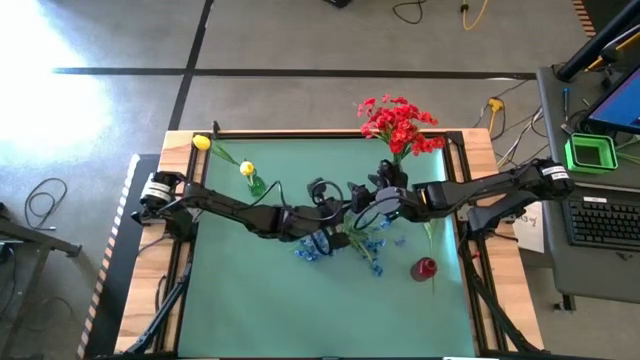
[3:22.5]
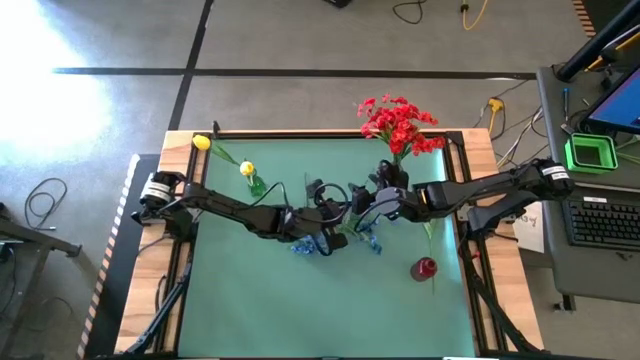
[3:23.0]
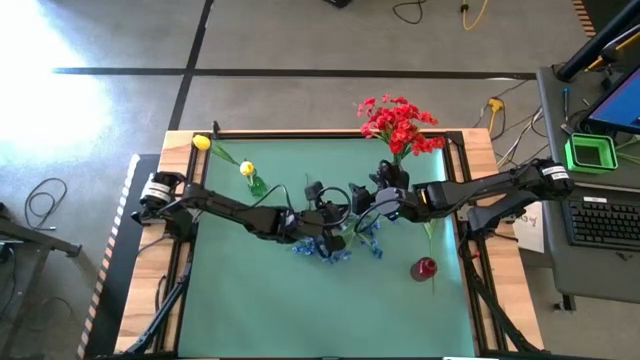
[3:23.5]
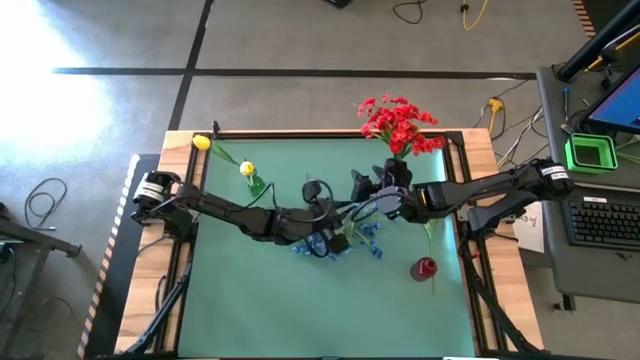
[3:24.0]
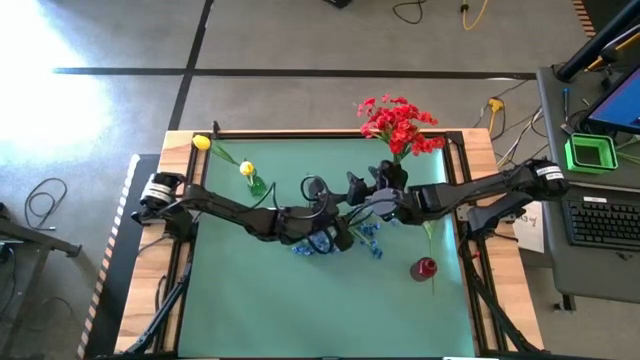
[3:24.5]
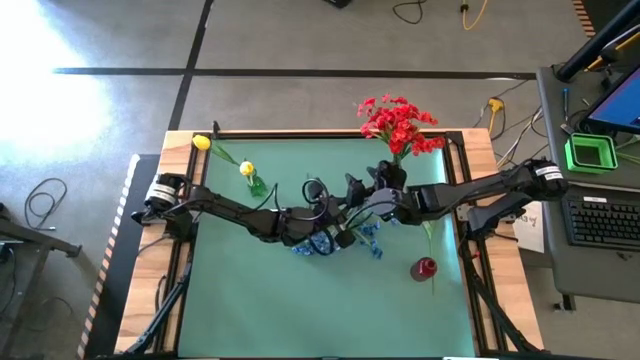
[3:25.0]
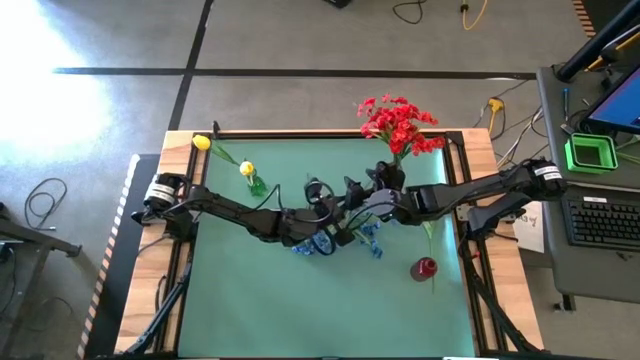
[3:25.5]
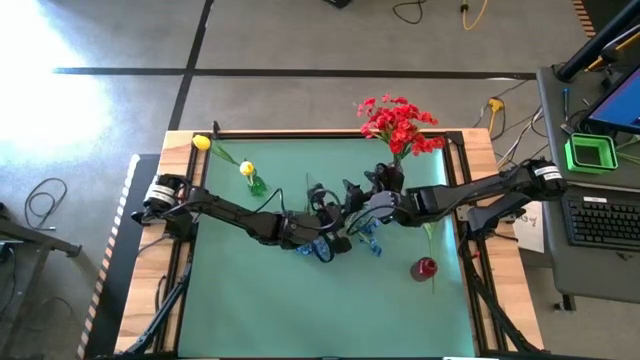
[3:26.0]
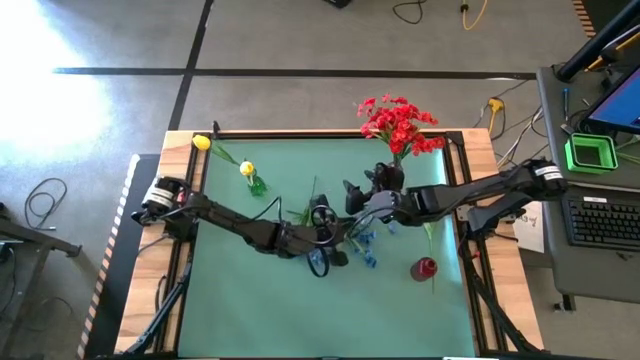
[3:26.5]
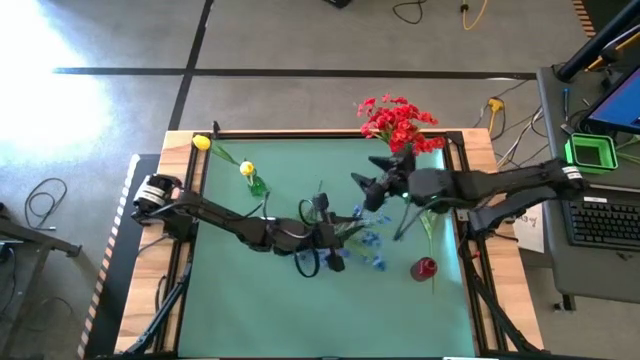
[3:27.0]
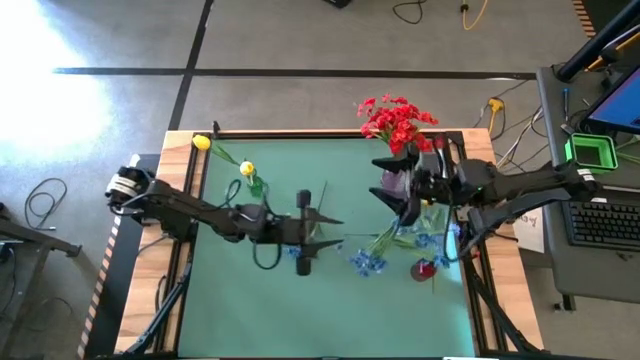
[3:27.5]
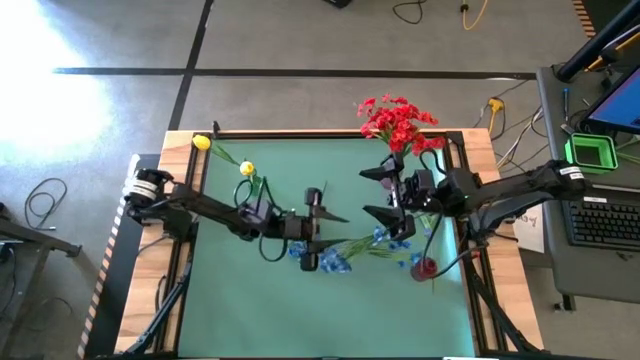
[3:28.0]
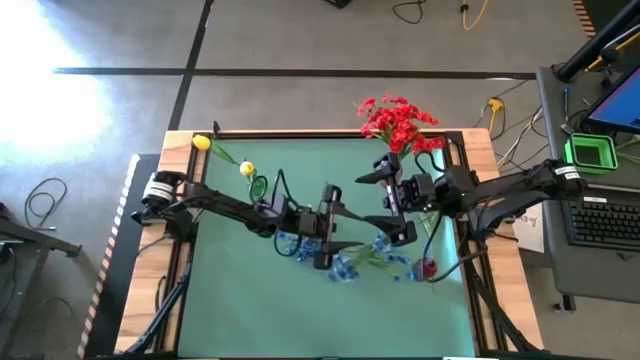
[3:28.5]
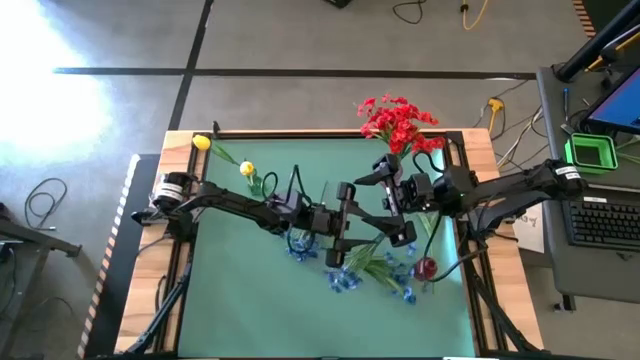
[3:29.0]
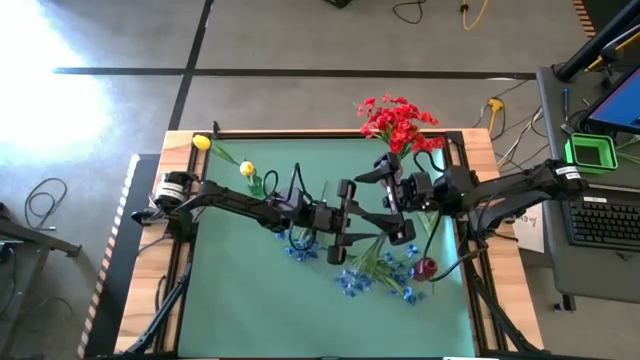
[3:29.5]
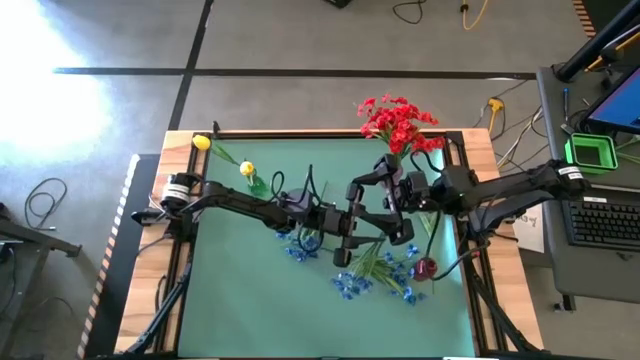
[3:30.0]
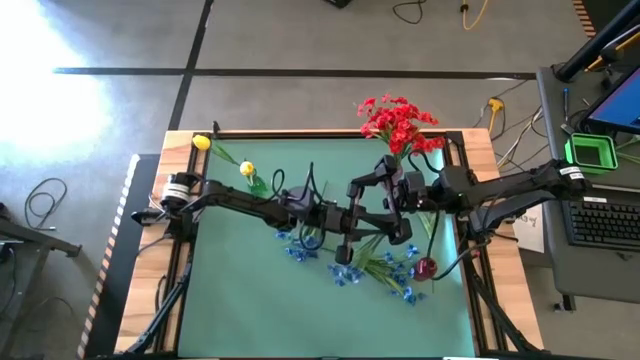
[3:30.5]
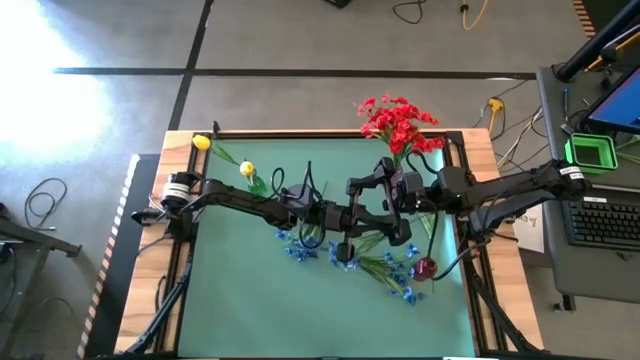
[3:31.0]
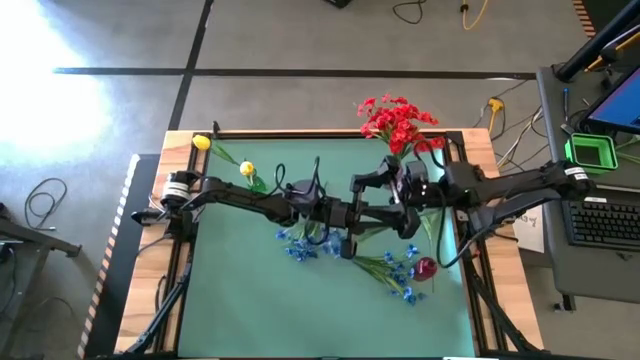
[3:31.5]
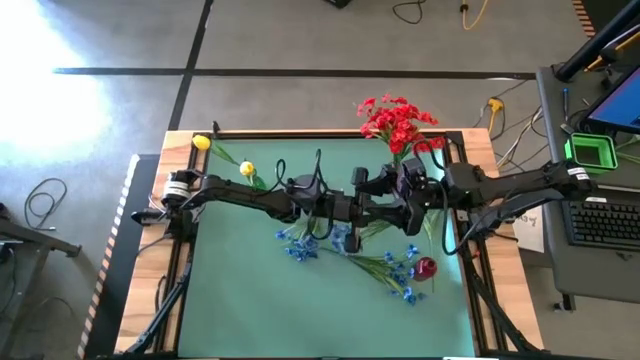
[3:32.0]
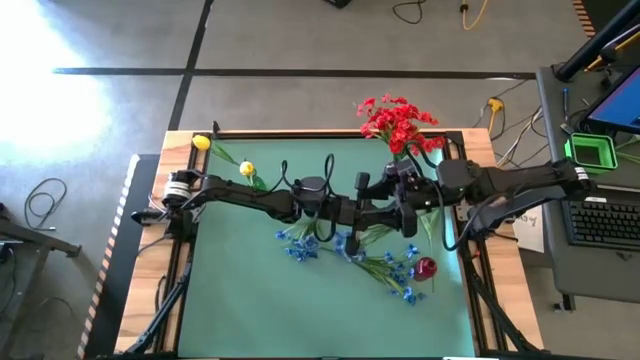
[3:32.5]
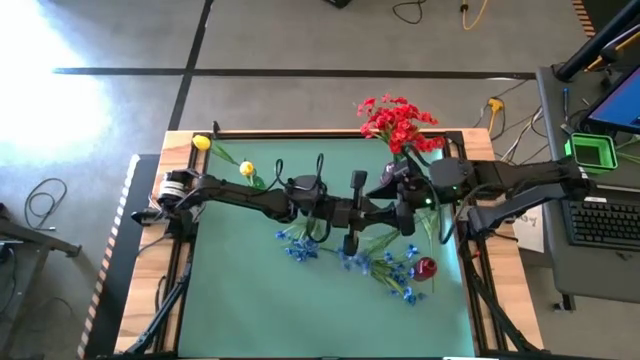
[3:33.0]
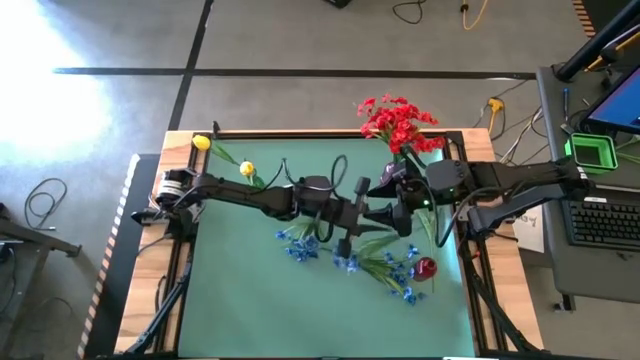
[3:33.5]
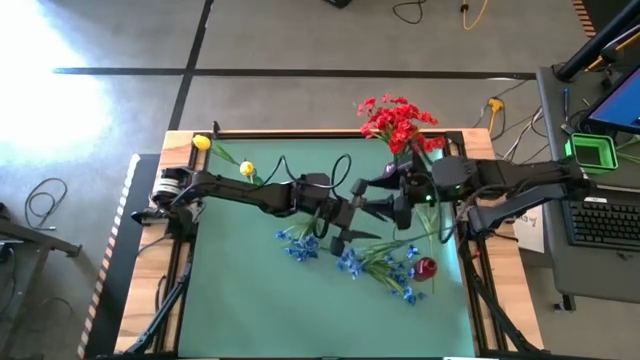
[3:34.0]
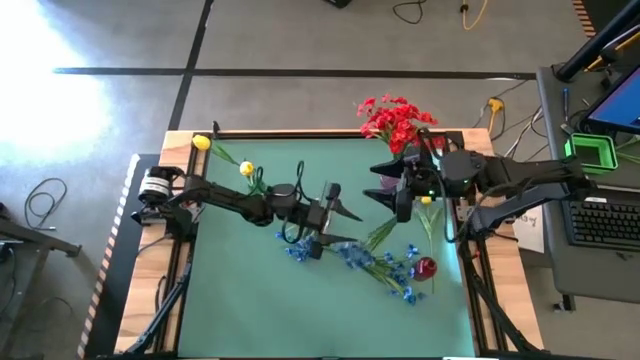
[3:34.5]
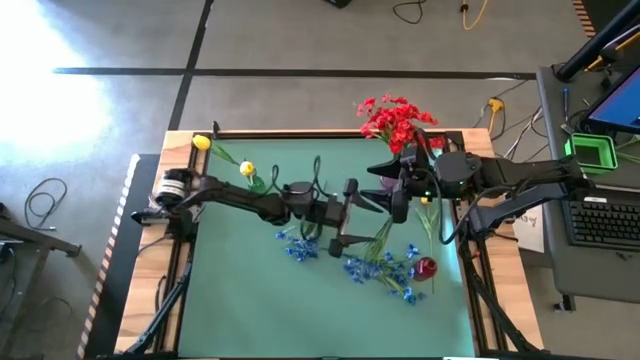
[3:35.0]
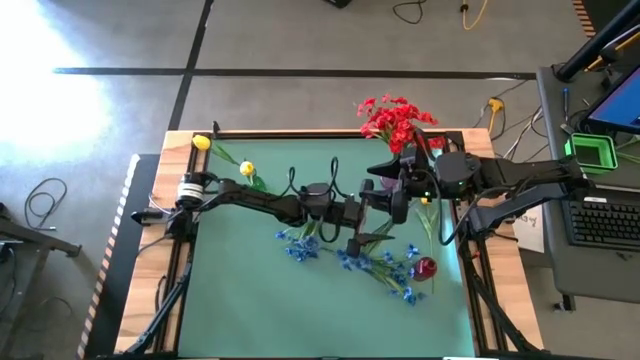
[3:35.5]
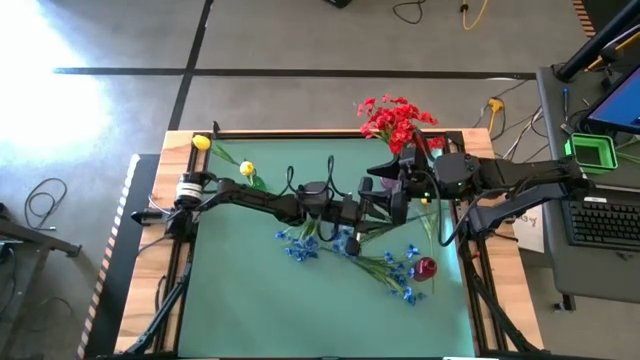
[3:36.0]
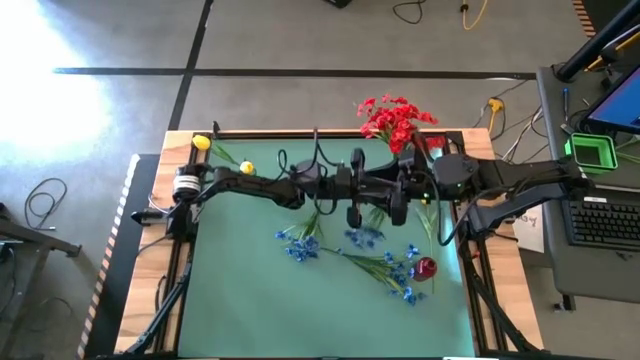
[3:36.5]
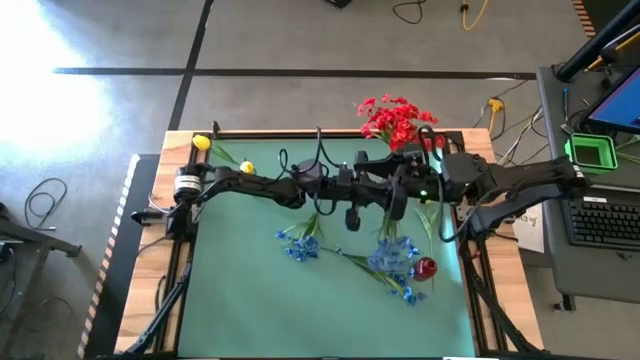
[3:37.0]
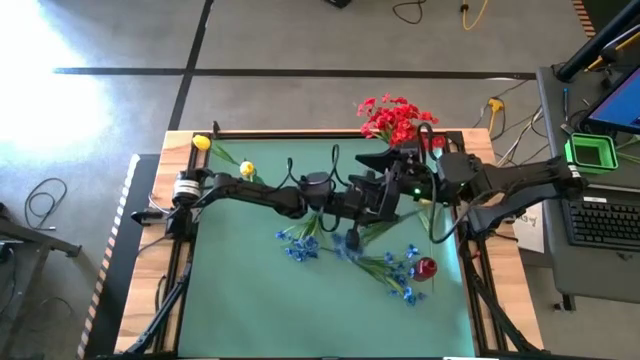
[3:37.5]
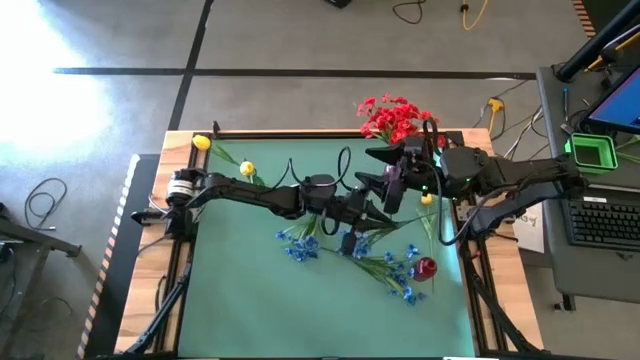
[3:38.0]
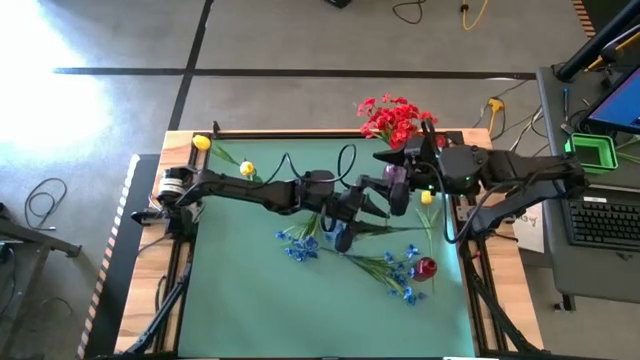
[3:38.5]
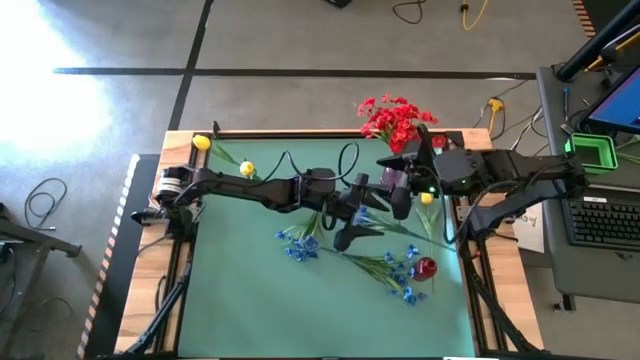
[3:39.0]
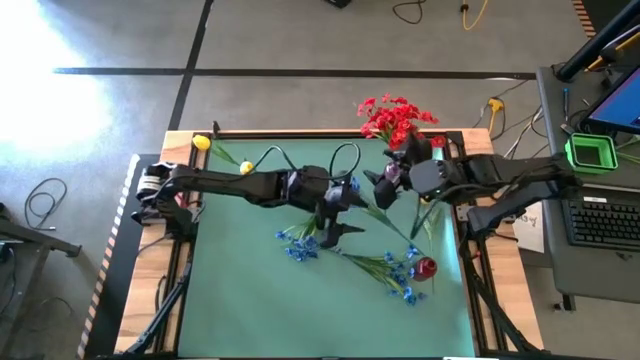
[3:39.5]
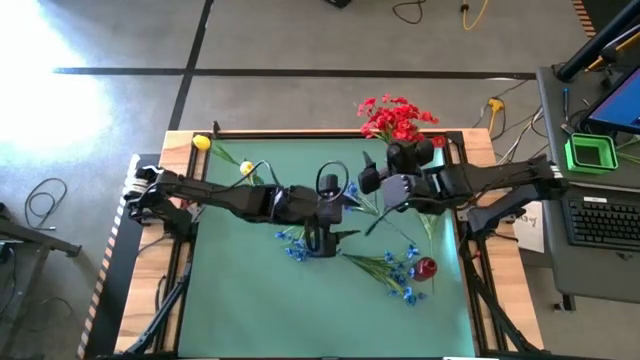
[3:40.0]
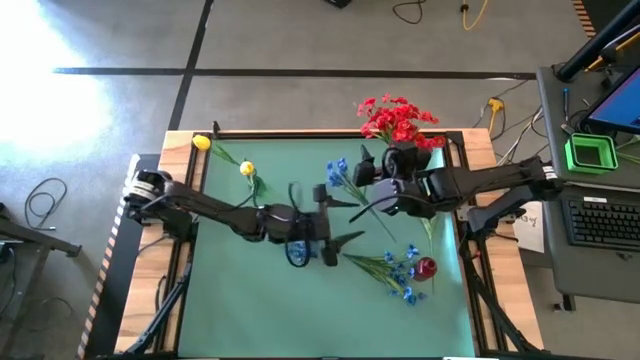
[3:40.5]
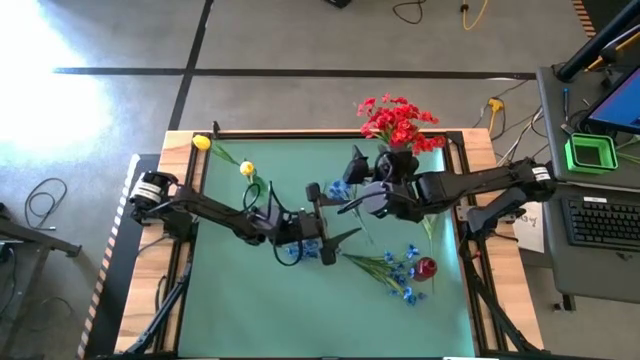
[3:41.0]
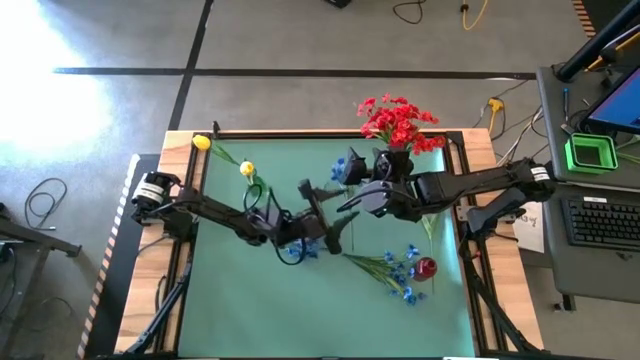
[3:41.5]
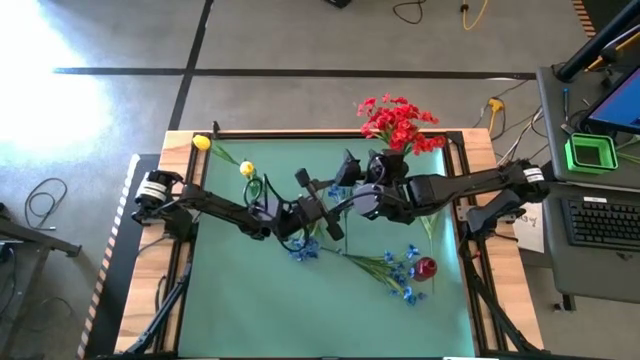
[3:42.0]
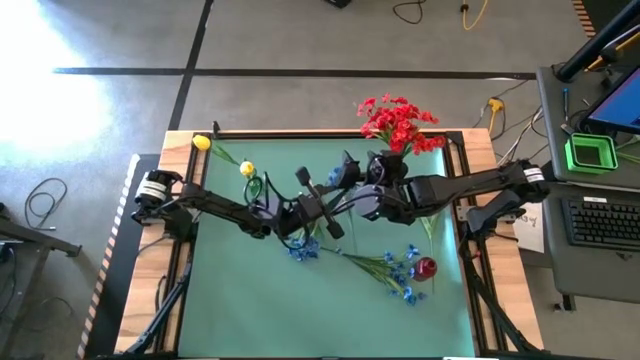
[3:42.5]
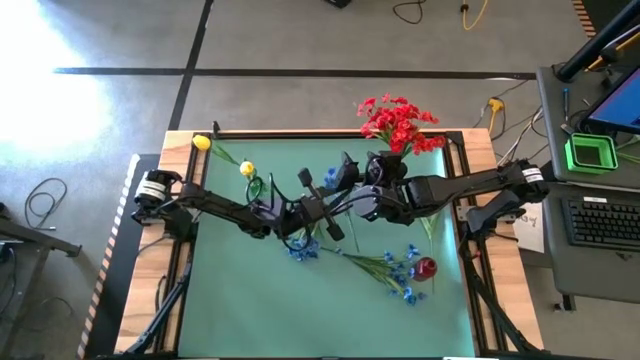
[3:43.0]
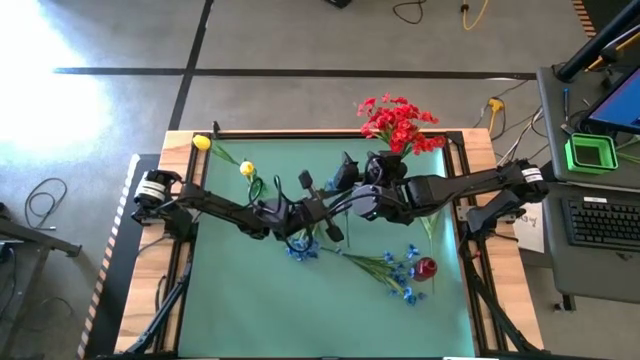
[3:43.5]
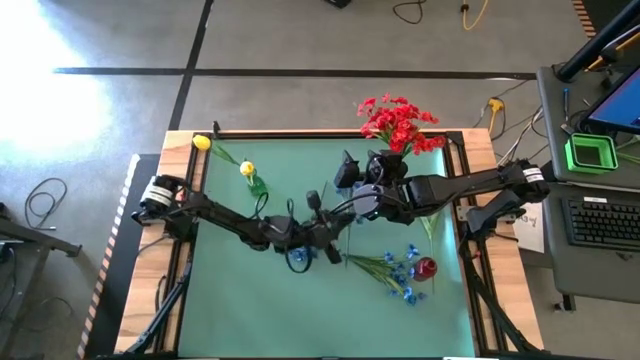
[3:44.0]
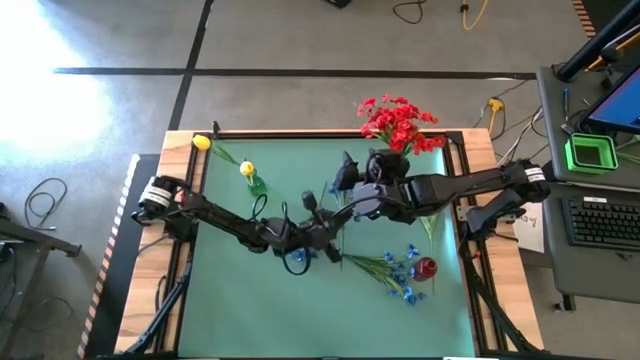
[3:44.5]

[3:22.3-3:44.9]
Task: Sort flowers into vase by color
Put the blue flower into the red vase
